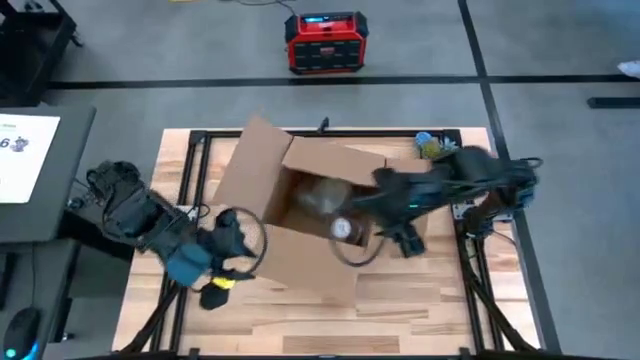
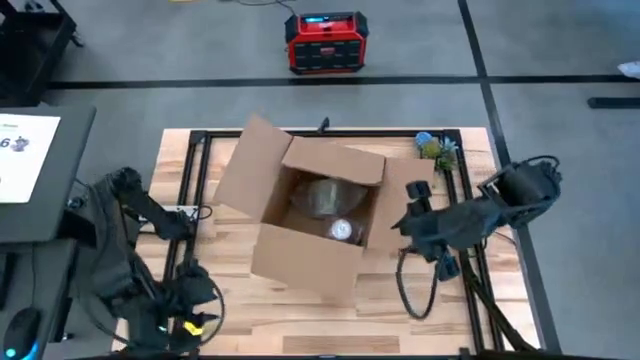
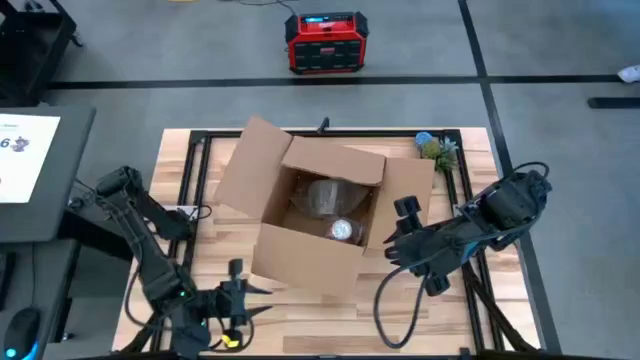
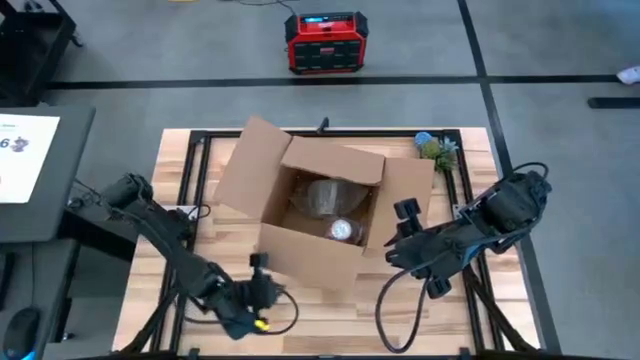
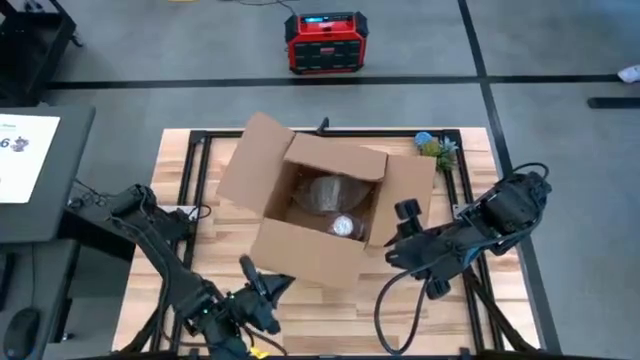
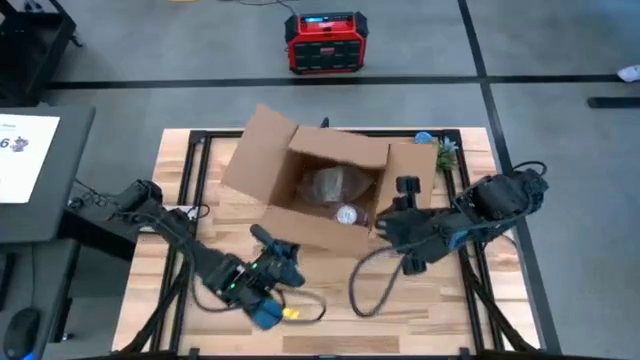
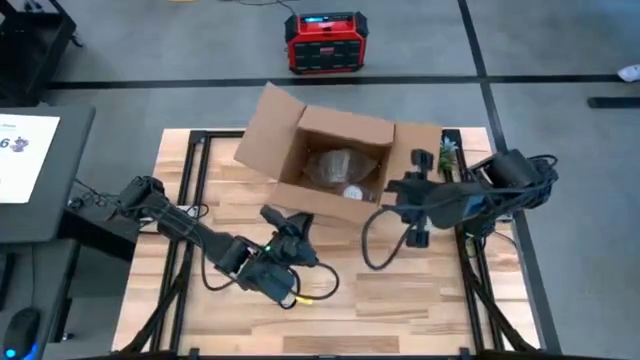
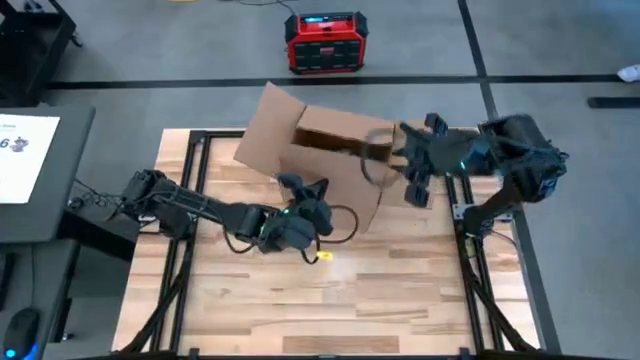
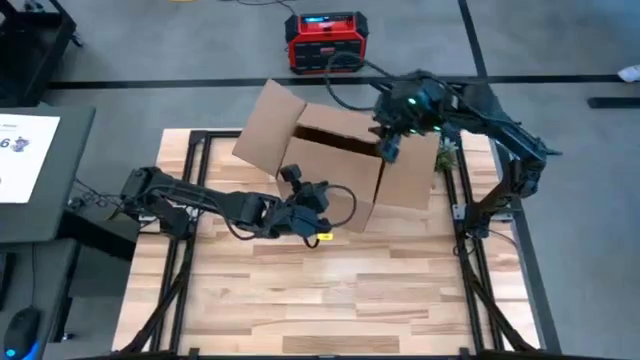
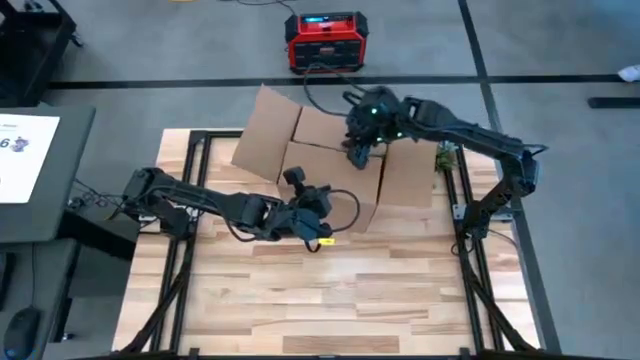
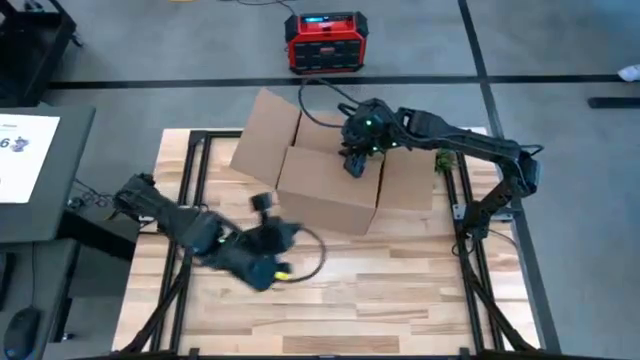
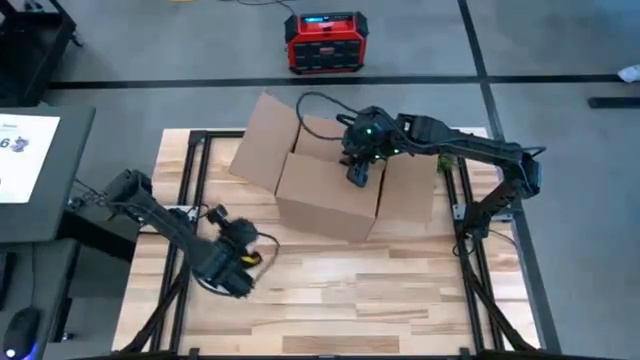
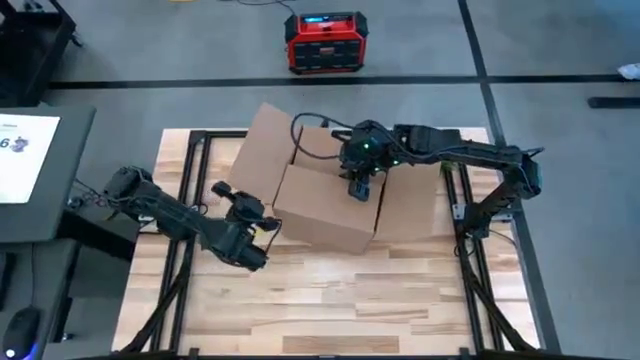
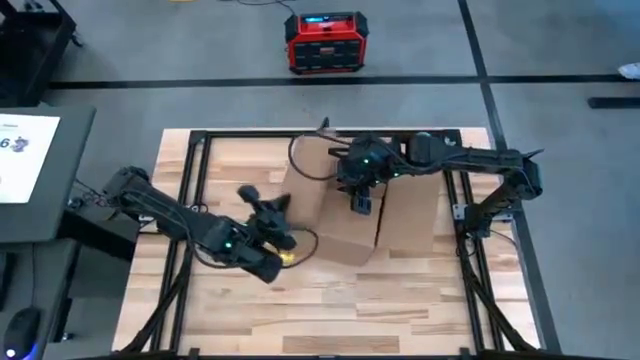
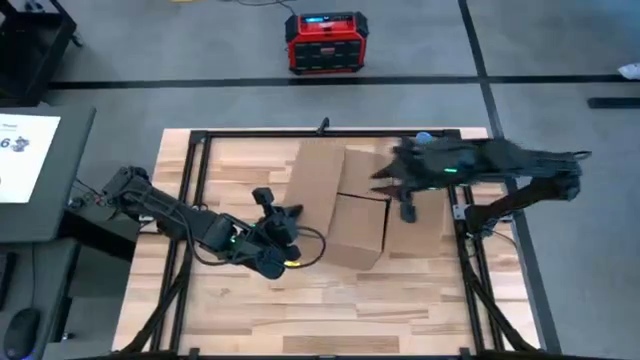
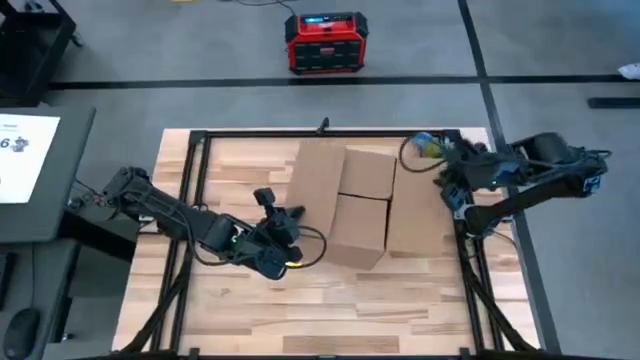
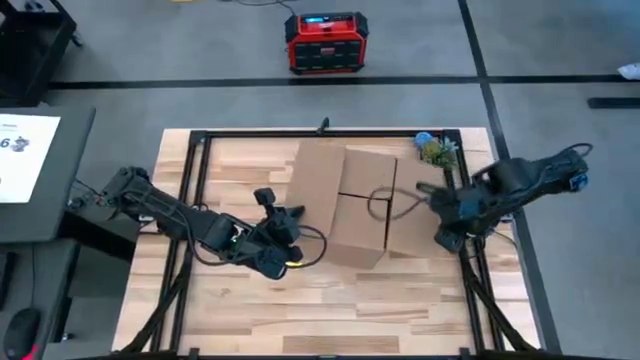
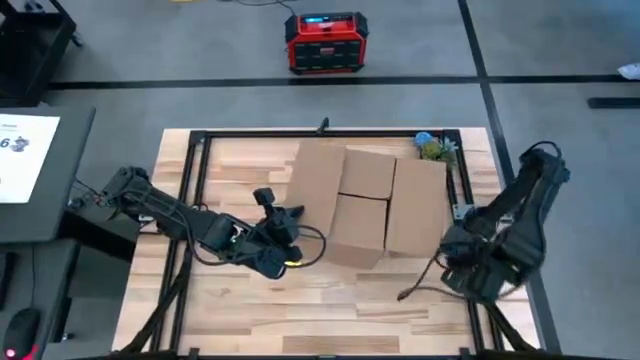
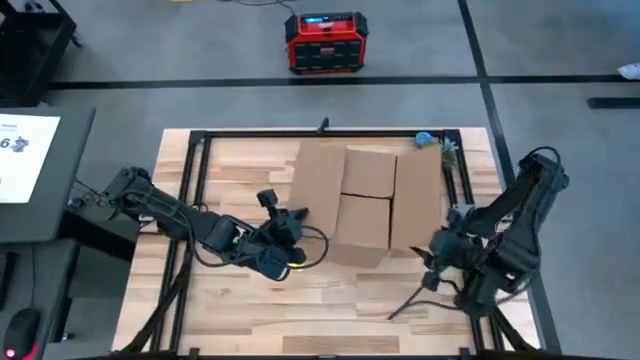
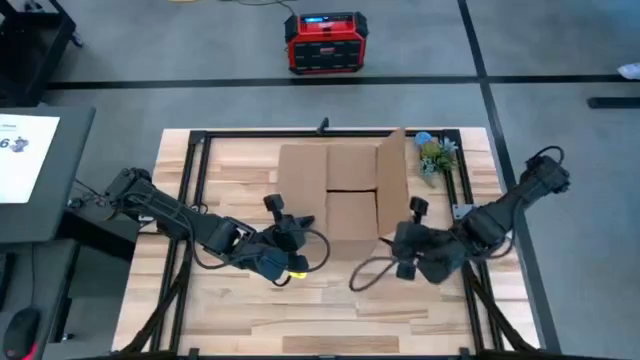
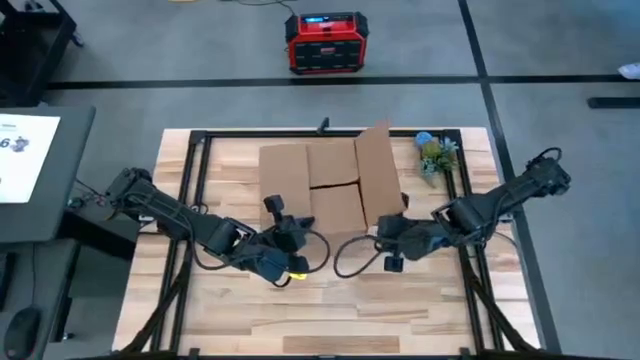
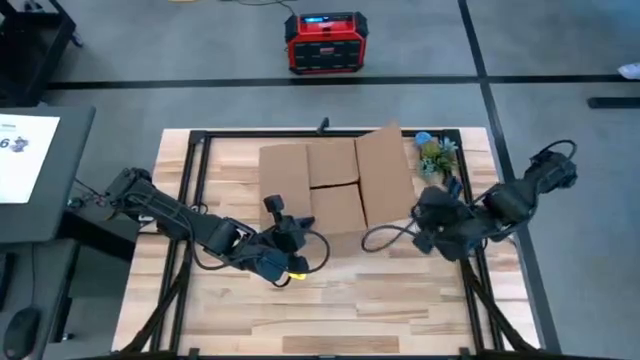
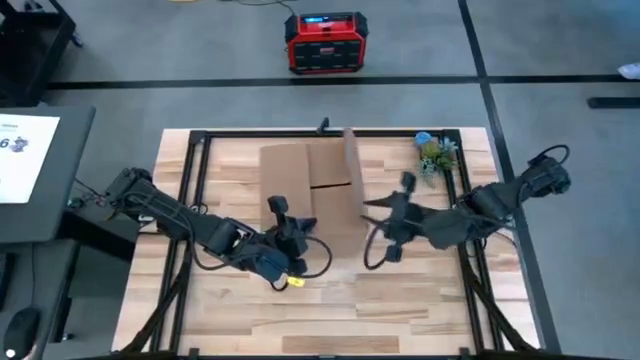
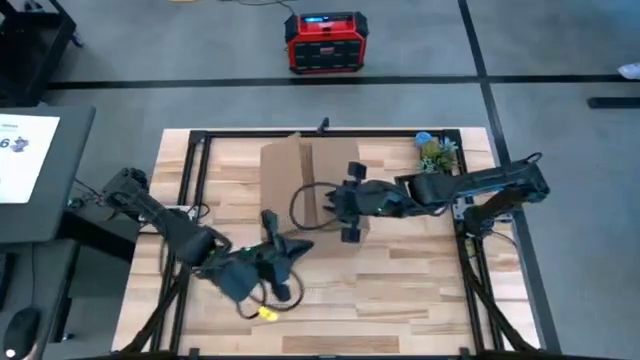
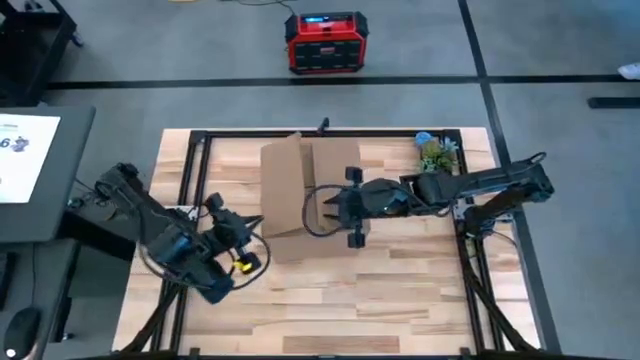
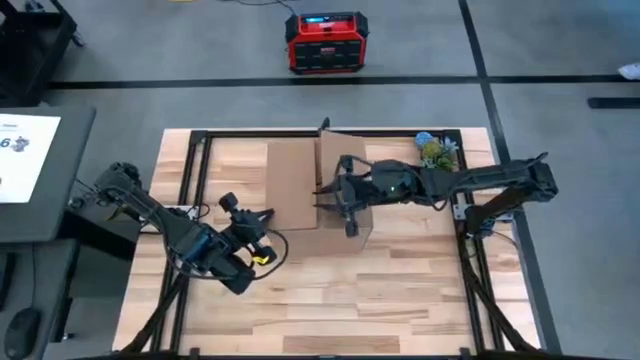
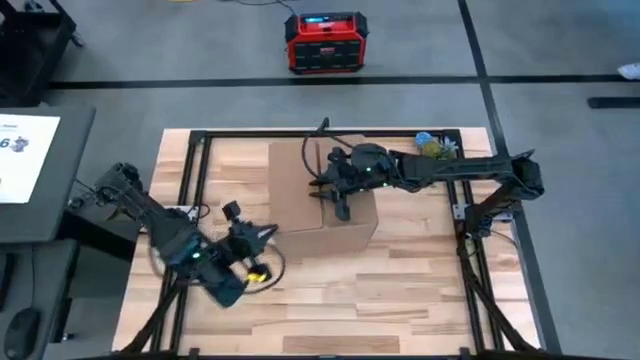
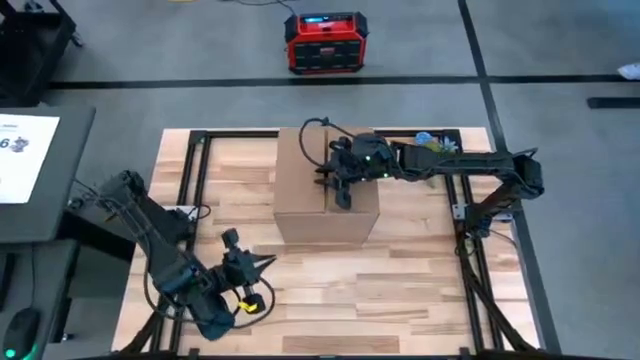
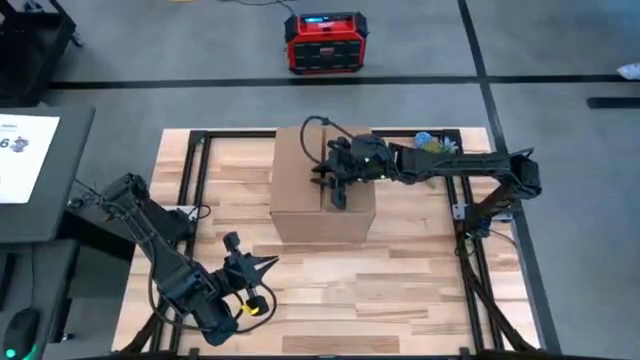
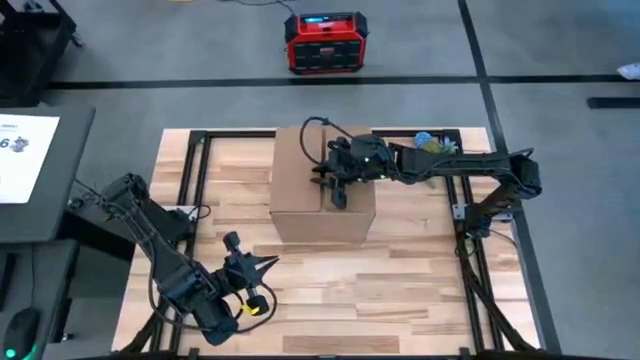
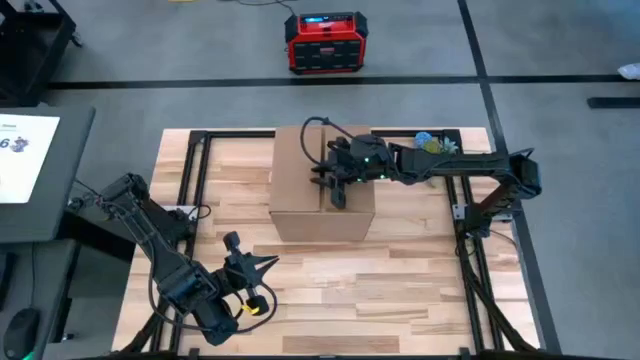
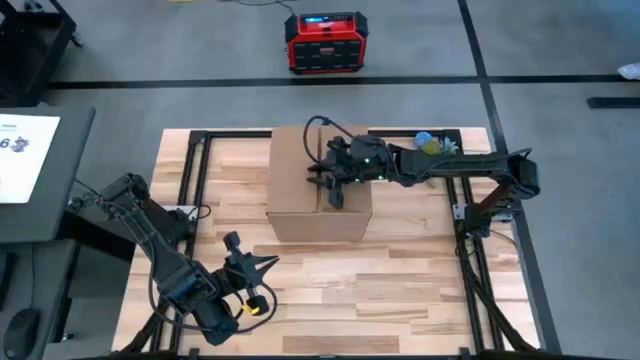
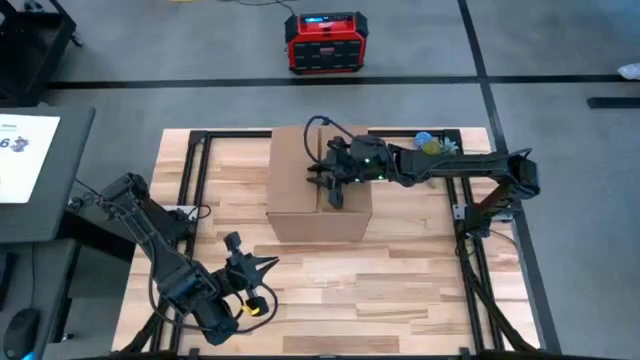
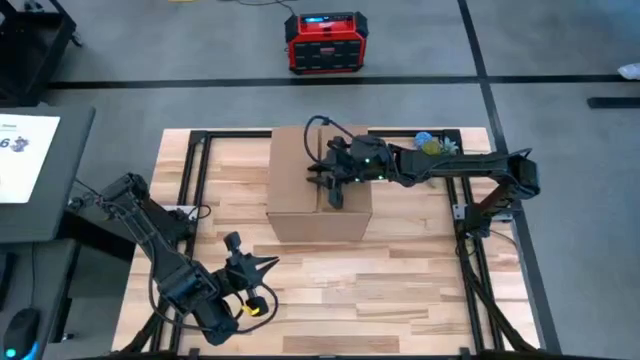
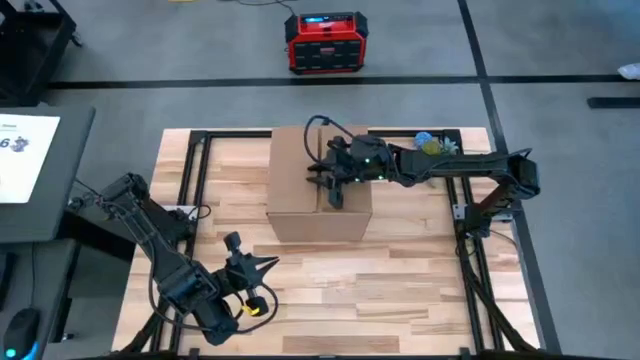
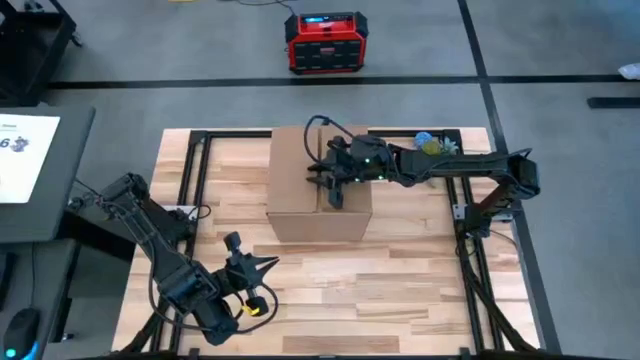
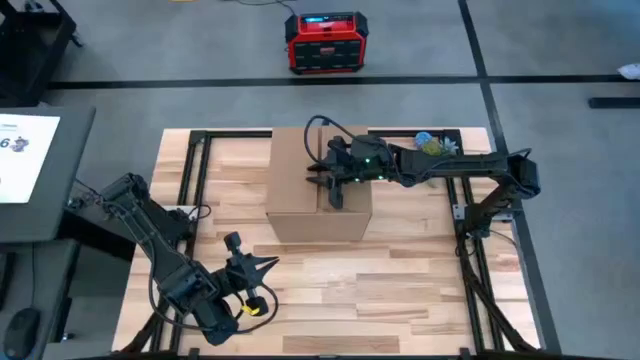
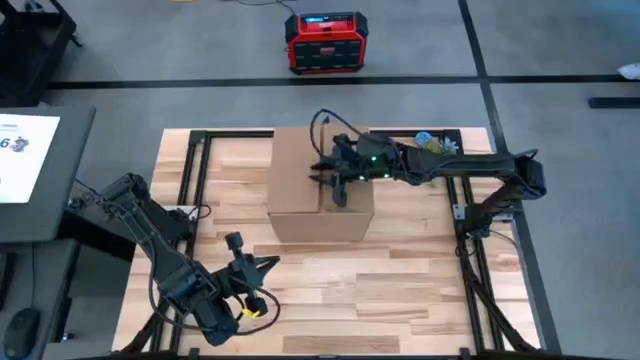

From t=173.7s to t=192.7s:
Task: wrap mug
Close the cardboard box

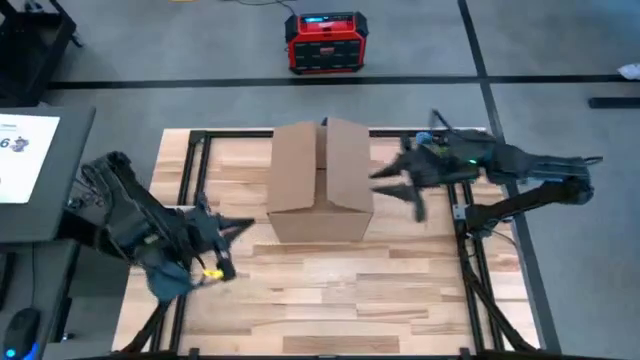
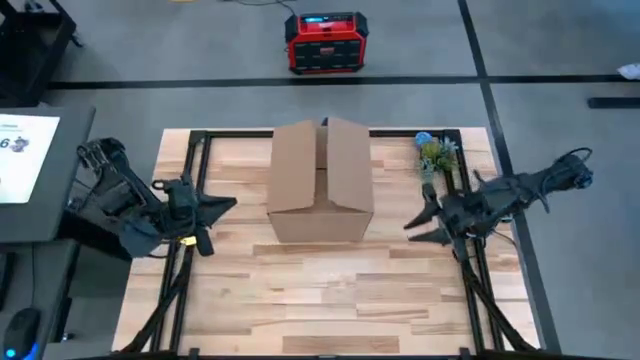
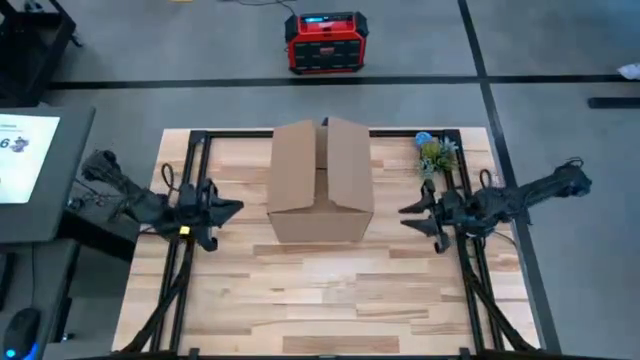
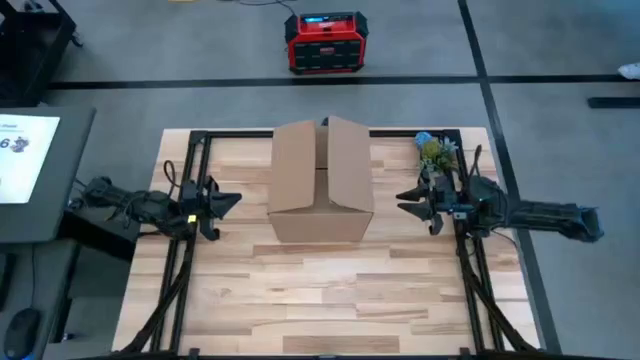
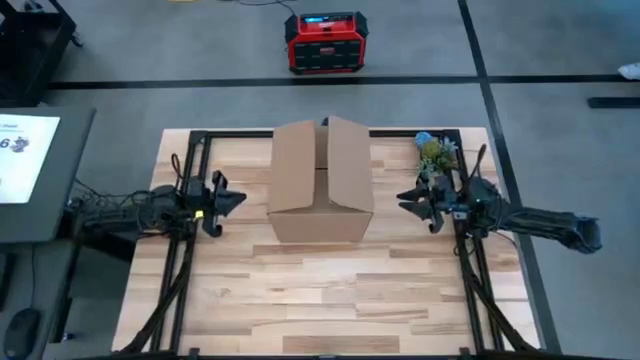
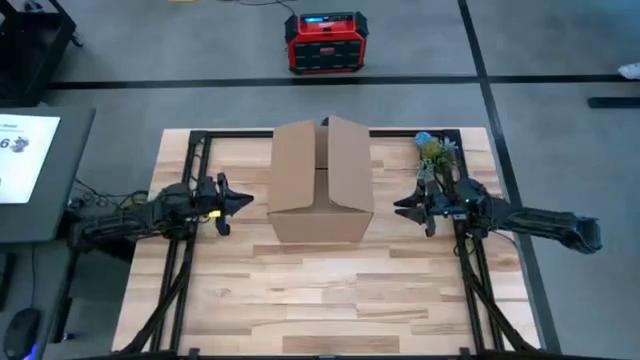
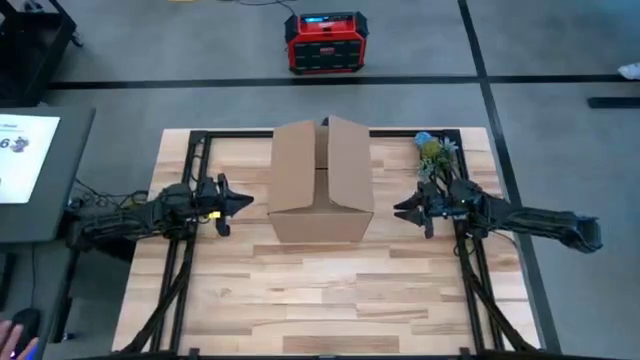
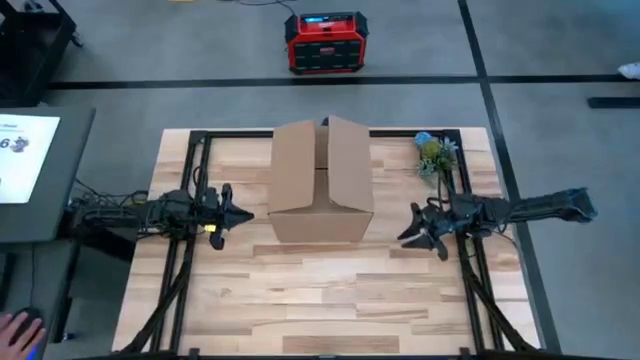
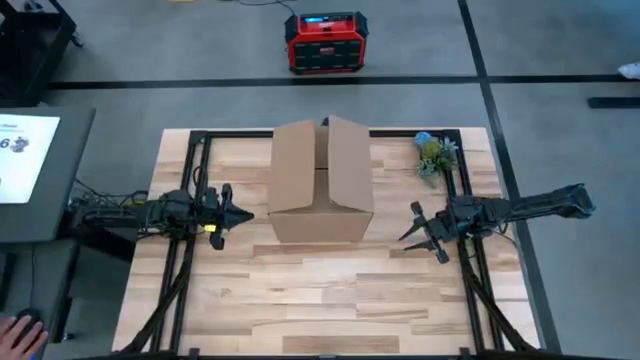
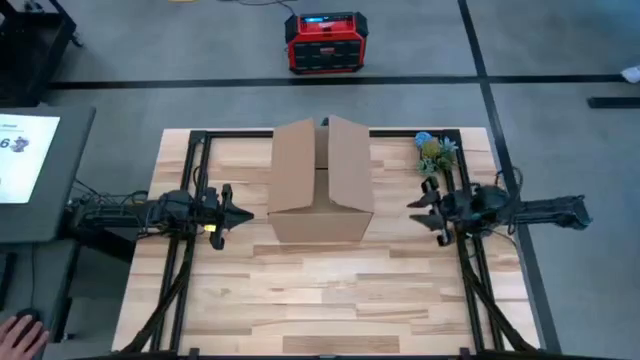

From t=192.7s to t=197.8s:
Return to Home Position
